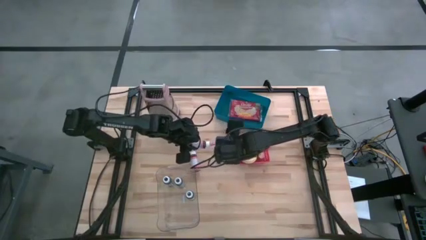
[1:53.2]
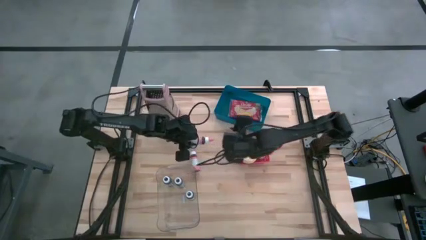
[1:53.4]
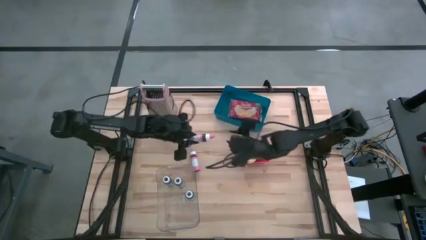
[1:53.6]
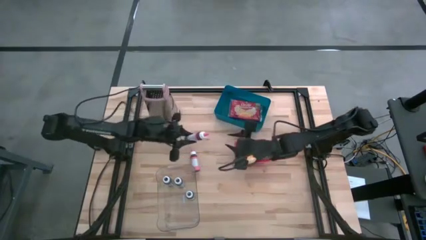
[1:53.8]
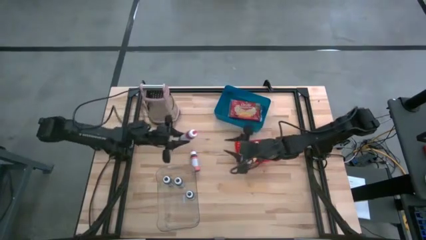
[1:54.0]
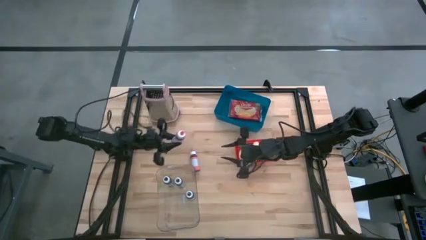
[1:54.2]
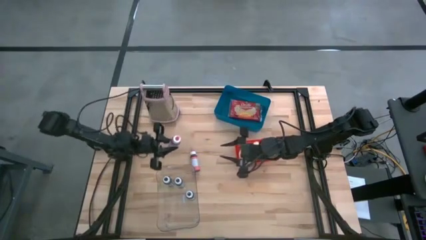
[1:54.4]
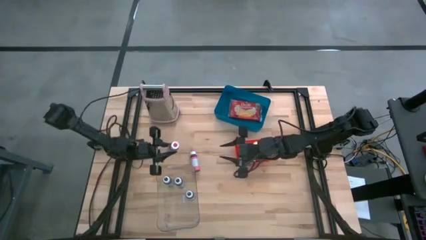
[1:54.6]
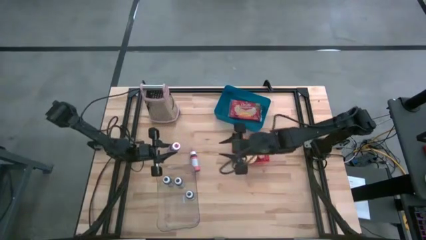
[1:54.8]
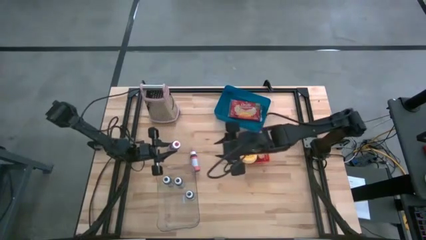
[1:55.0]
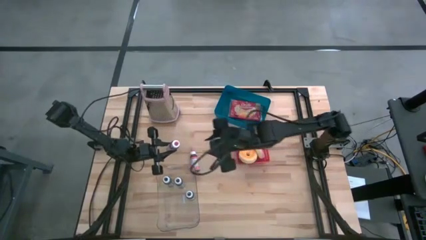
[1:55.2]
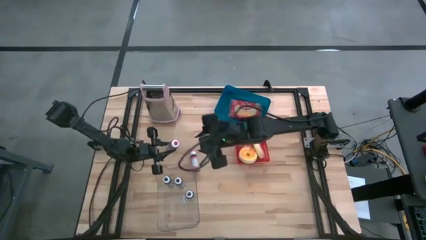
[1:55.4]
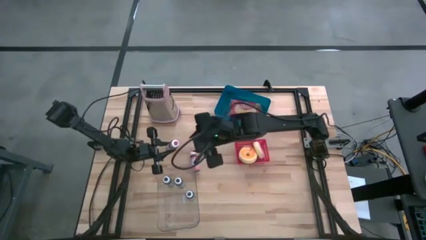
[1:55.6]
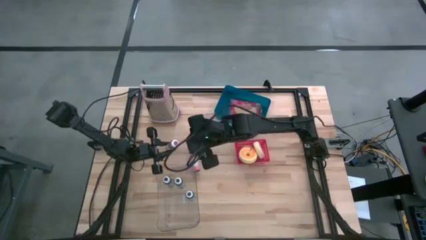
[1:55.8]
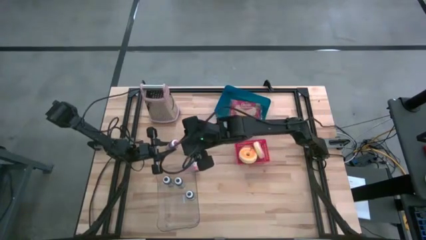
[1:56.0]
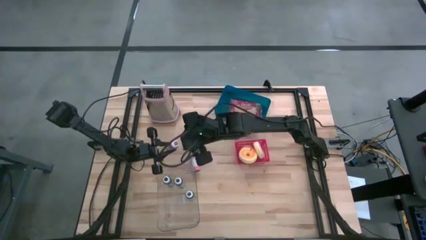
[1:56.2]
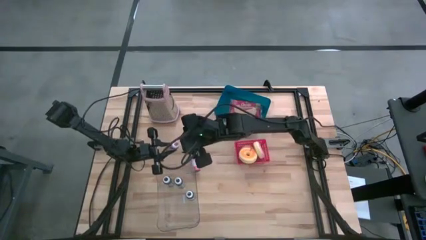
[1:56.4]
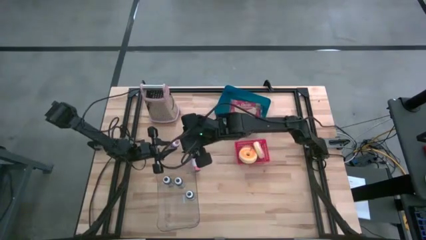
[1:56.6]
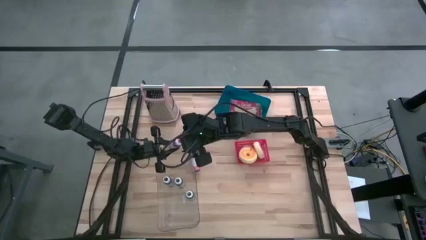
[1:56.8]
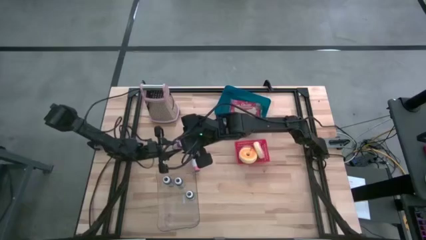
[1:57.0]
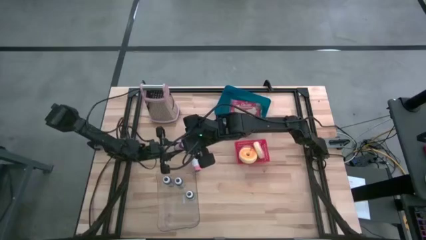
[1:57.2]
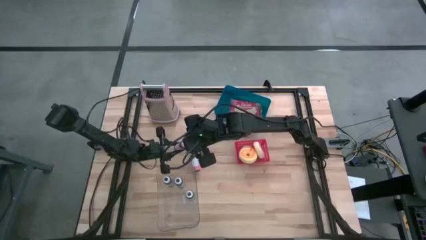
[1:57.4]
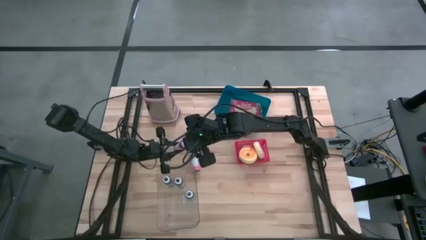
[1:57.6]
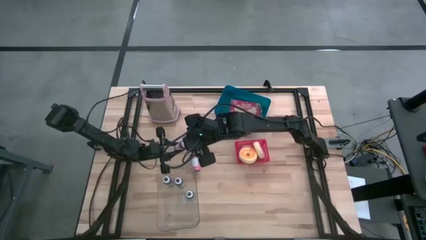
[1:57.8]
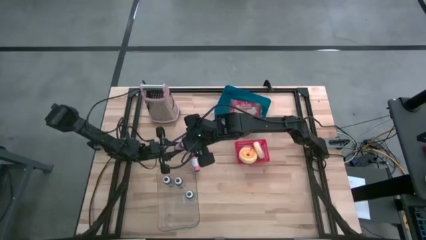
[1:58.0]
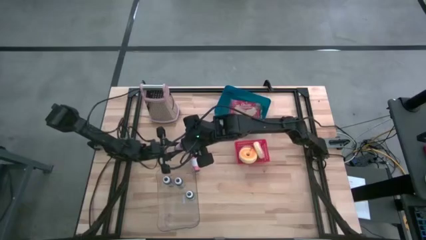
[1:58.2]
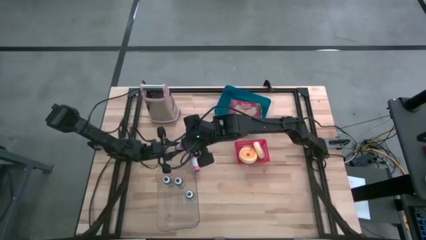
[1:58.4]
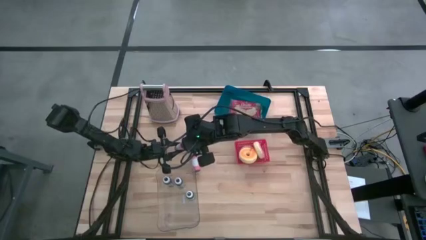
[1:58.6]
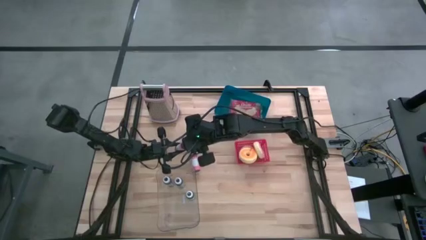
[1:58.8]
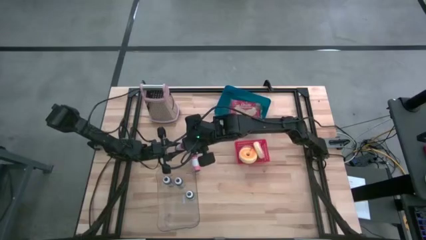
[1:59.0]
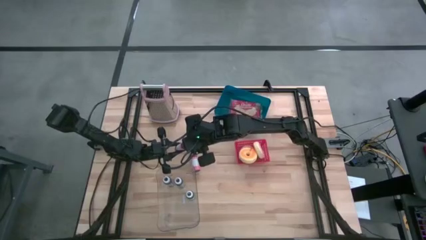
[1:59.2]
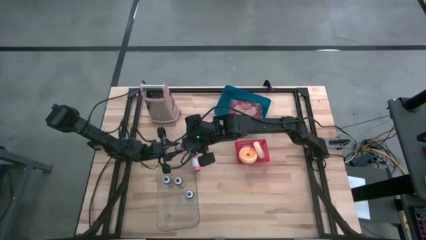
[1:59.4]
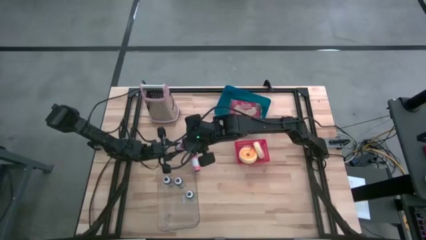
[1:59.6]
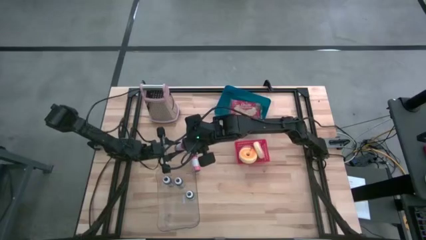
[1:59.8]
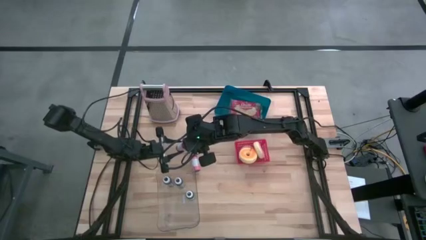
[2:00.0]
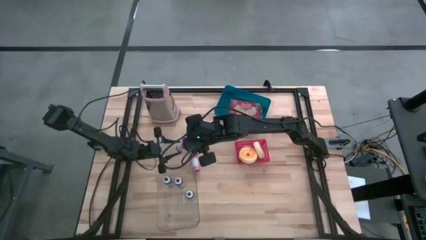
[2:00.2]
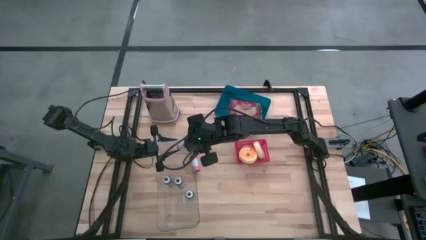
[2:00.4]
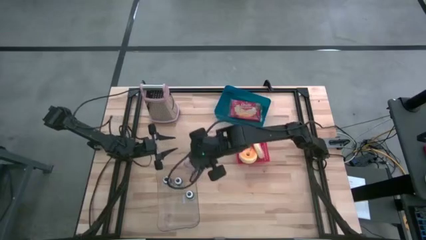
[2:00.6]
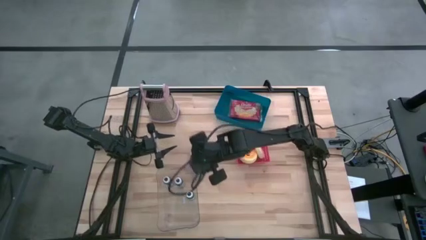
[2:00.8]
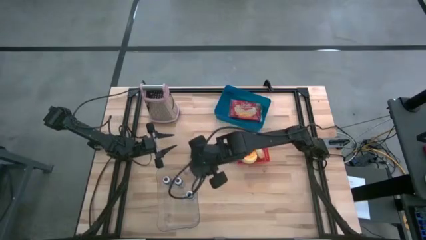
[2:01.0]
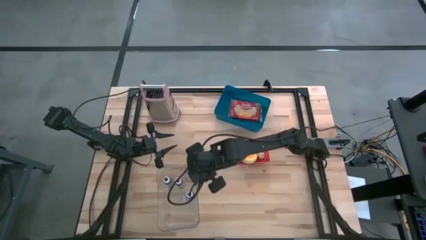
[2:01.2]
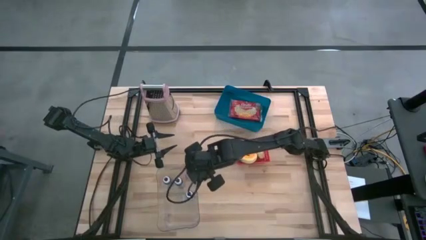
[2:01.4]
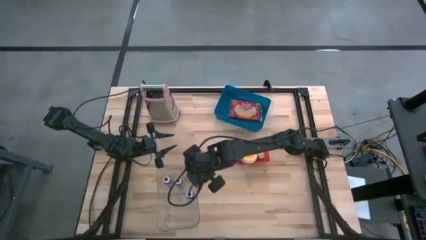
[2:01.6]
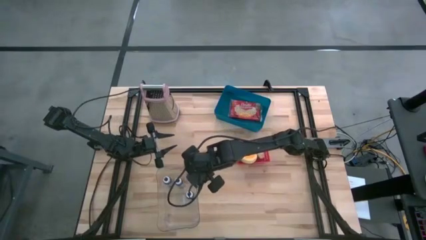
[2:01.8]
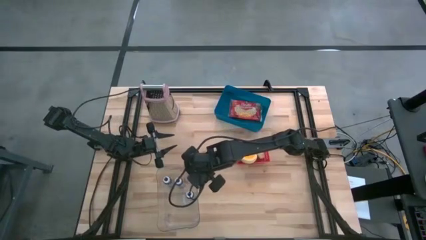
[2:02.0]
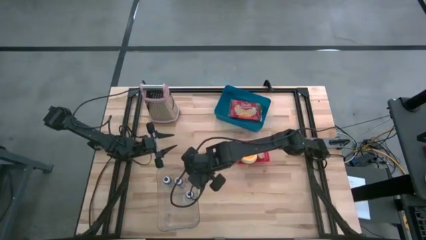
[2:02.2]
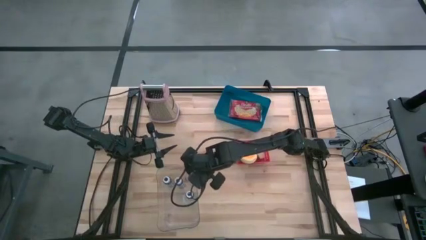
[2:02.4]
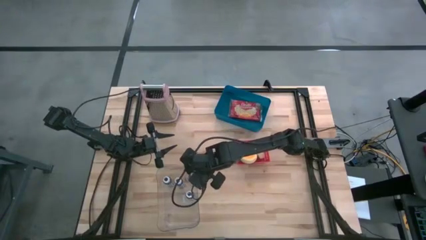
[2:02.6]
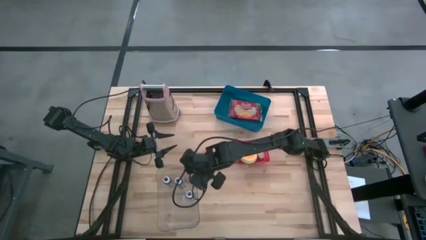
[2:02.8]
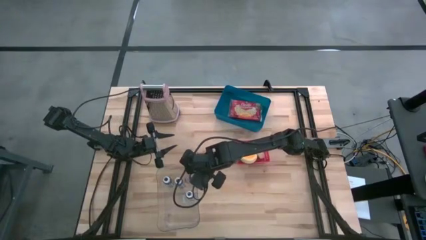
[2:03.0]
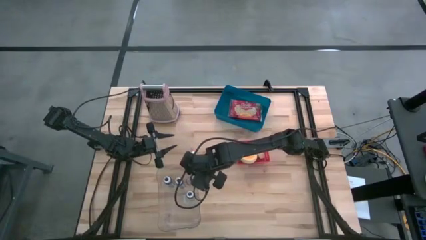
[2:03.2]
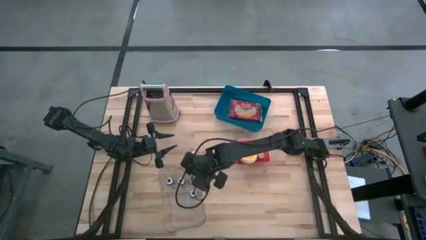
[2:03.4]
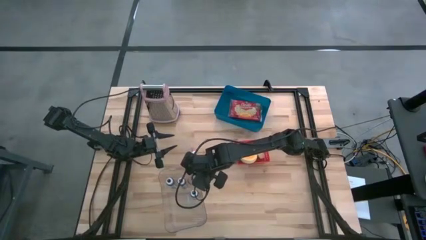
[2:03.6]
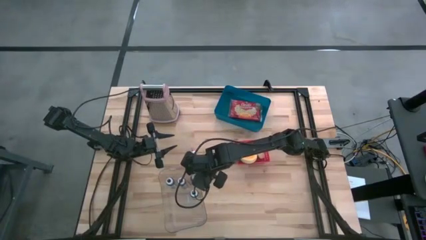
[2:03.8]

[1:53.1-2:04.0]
Task: Pick & Place Food Item
Put the top pink food coloring bottle into the transparent bin

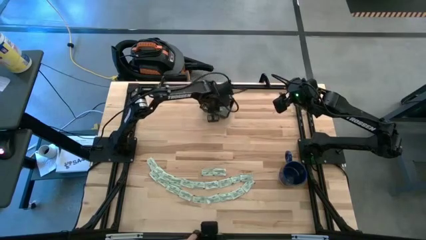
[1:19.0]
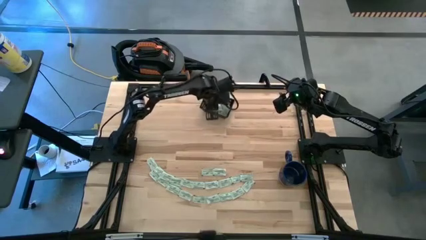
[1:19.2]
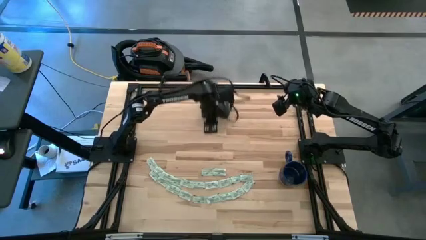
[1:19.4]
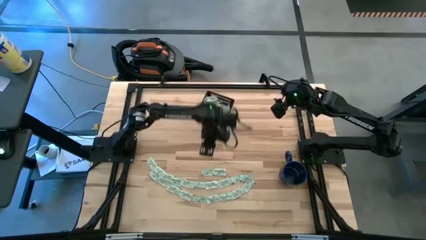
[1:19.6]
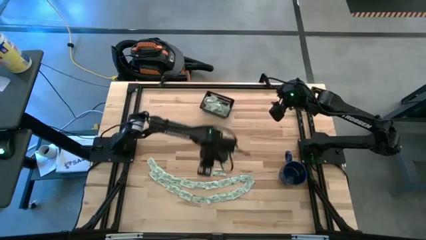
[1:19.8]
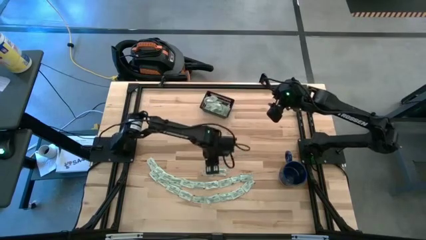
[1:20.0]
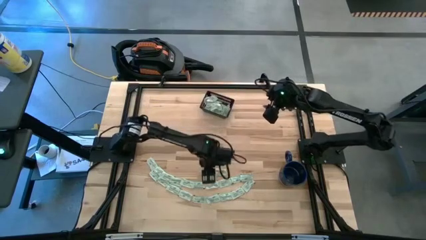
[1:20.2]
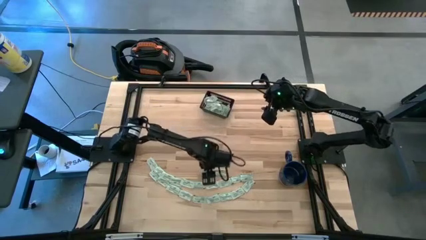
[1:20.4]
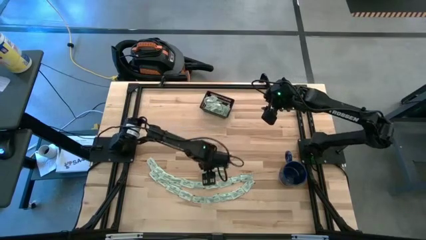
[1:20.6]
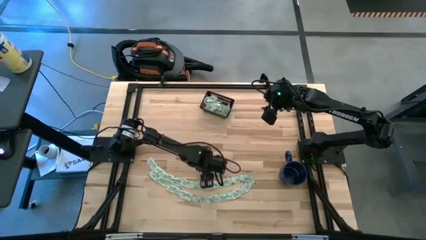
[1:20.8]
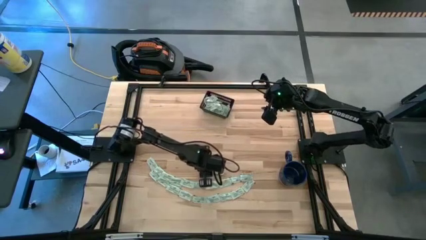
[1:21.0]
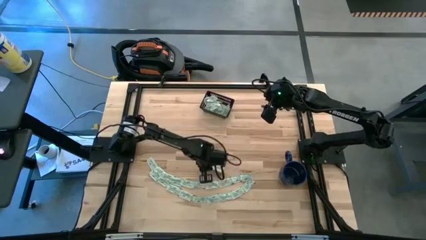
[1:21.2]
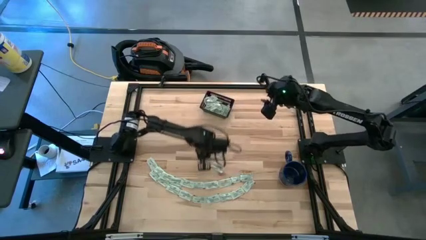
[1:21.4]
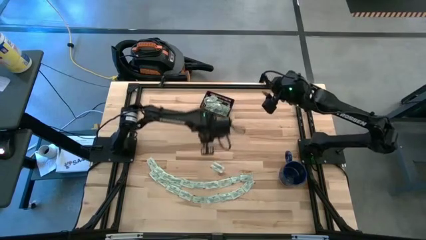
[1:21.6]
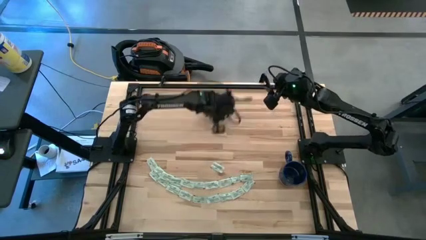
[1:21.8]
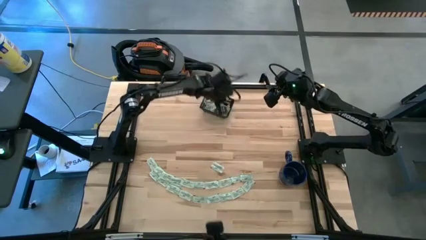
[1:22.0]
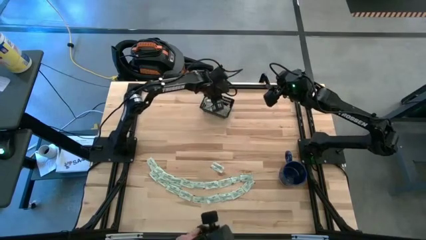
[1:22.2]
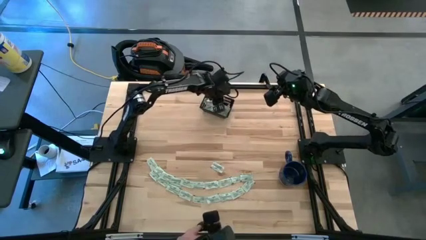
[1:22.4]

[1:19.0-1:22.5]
Task: Pick and place Stevia / Truvia into bins
Put the stevia packet into the black bin

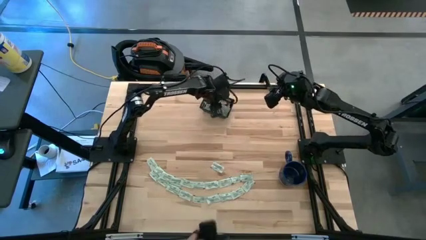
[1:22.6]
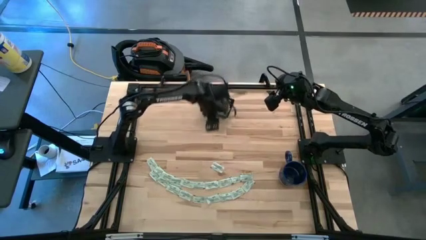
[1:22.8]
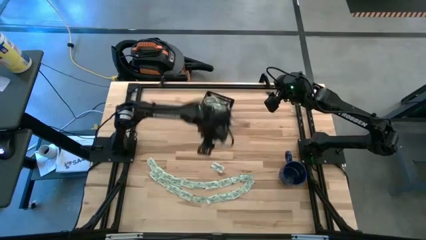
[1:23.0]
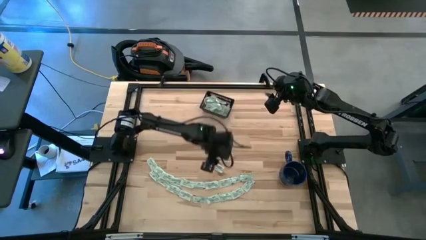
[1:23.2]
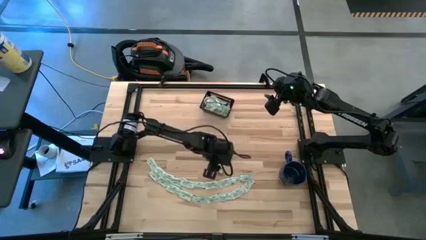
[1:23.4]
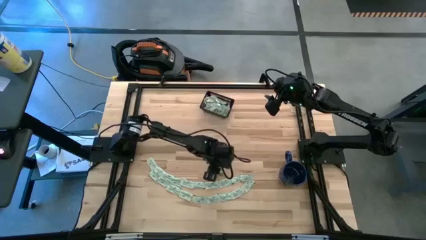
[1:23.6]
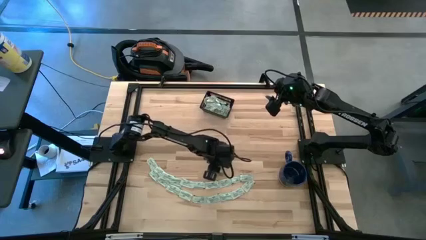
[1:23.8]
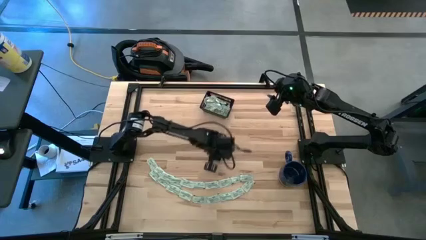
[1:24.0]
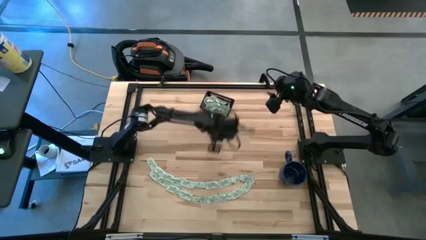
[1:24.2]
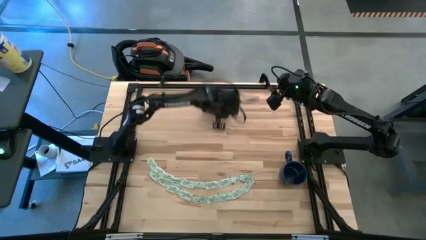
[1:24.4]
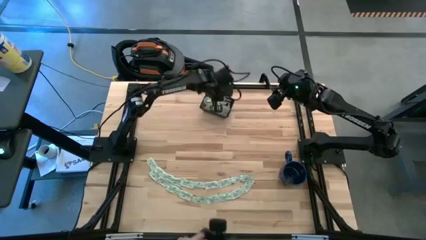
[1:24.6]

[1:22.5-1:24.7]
Put the stevia packet into the black bin
